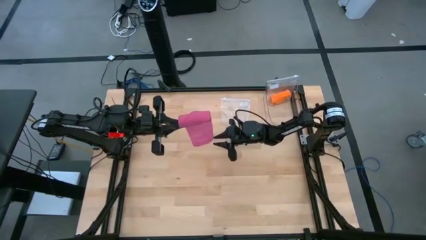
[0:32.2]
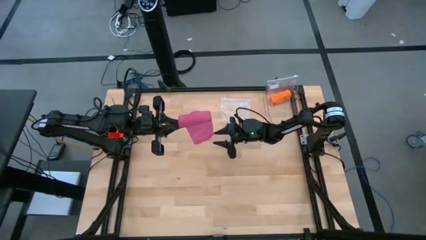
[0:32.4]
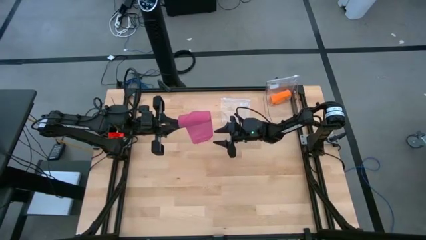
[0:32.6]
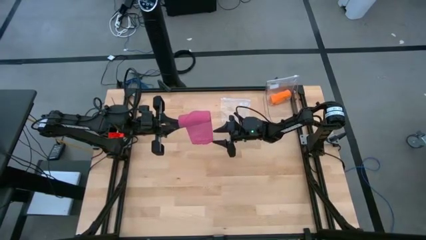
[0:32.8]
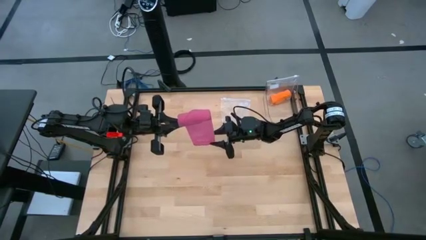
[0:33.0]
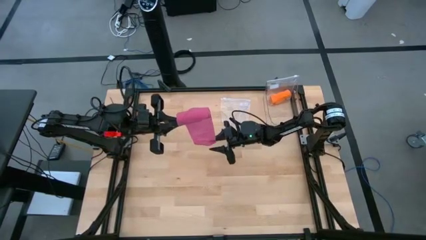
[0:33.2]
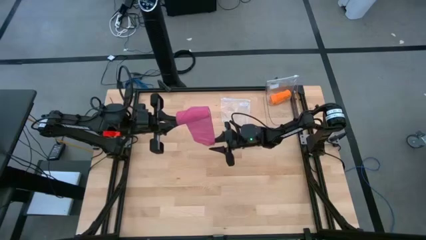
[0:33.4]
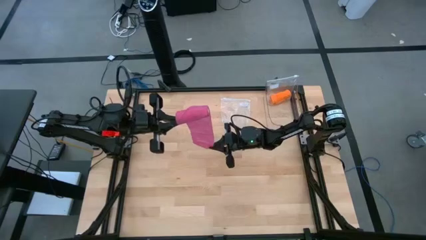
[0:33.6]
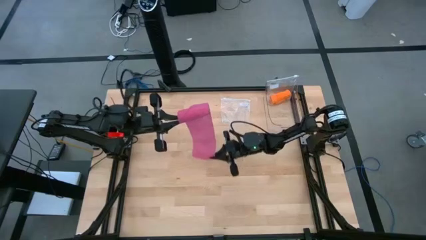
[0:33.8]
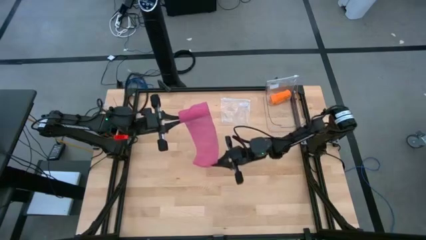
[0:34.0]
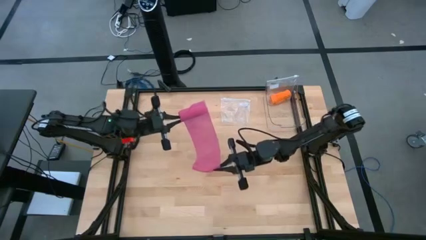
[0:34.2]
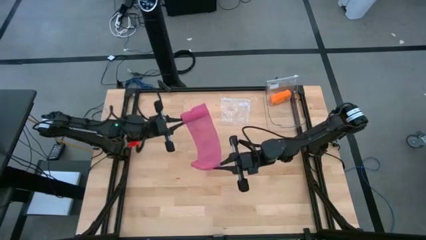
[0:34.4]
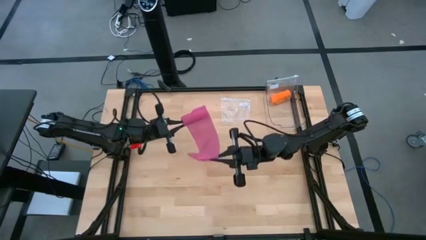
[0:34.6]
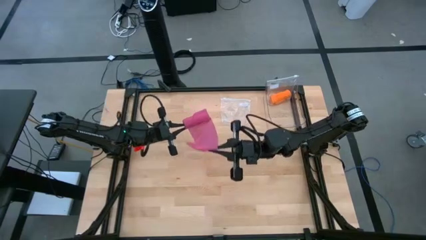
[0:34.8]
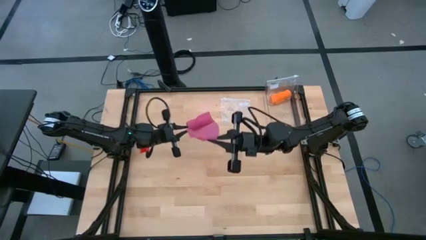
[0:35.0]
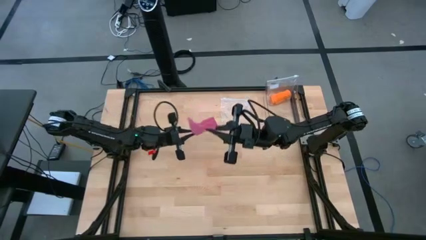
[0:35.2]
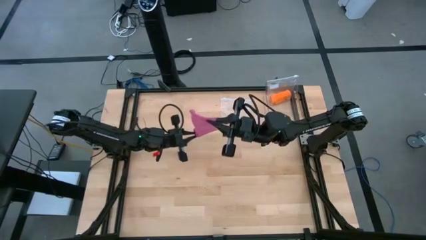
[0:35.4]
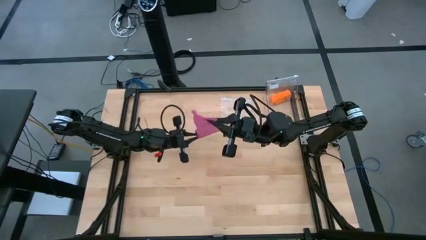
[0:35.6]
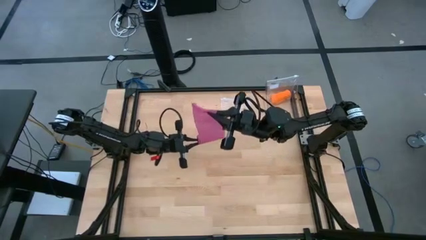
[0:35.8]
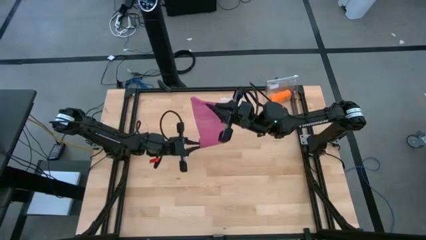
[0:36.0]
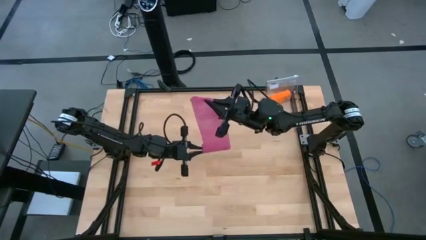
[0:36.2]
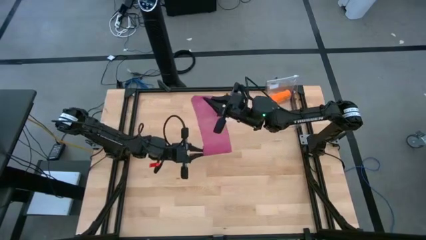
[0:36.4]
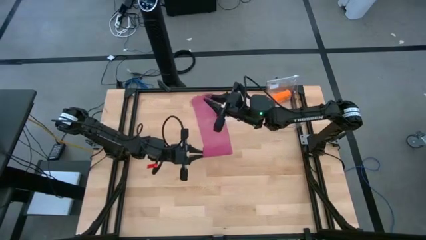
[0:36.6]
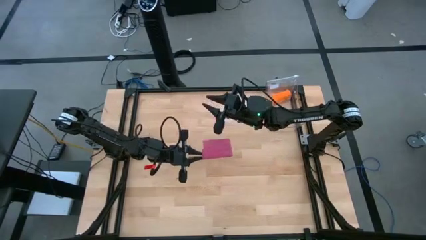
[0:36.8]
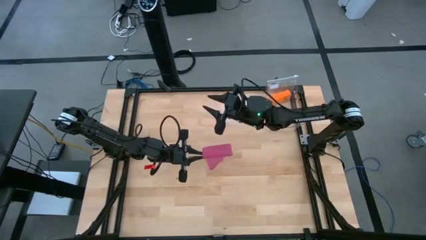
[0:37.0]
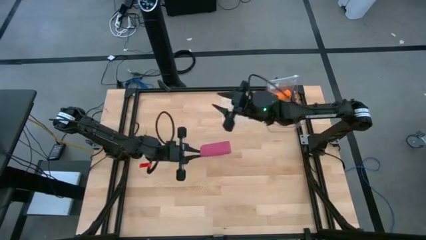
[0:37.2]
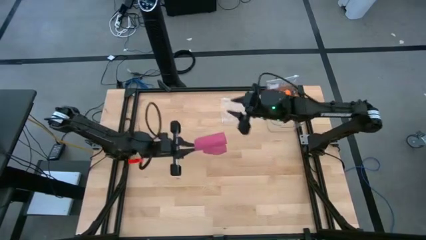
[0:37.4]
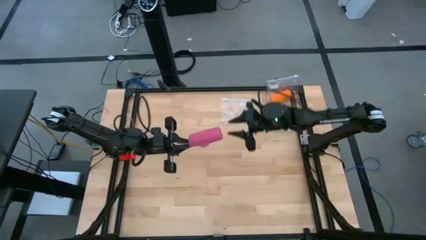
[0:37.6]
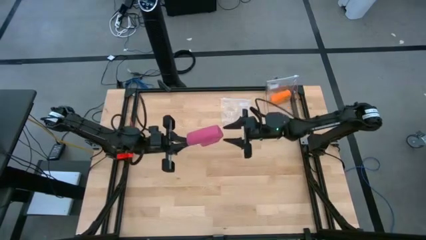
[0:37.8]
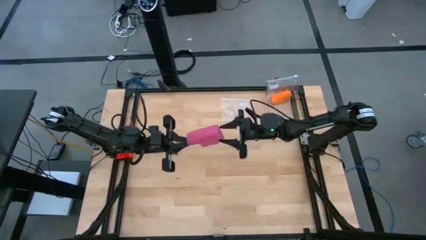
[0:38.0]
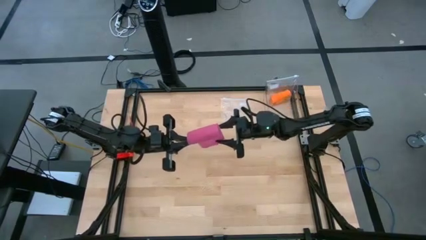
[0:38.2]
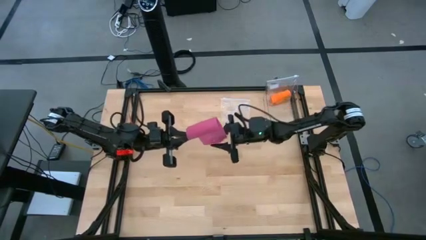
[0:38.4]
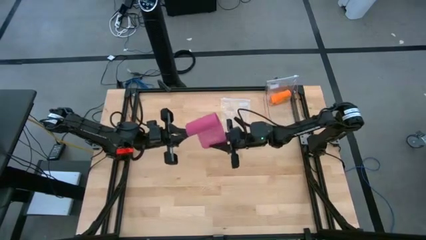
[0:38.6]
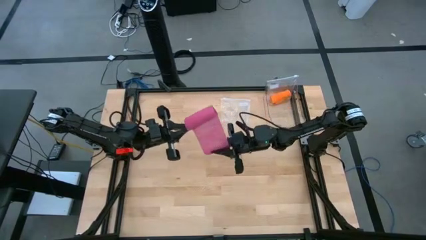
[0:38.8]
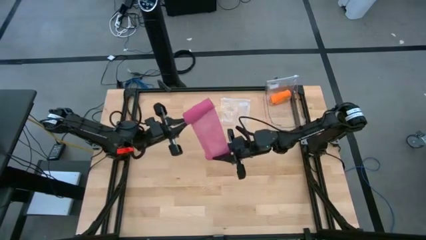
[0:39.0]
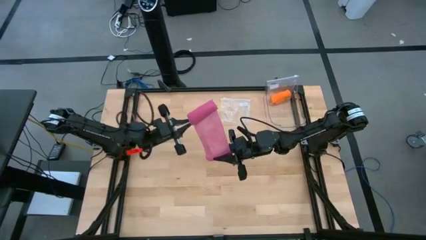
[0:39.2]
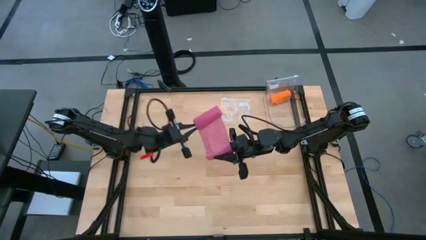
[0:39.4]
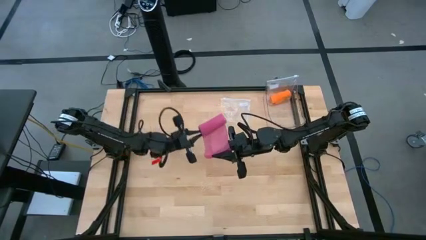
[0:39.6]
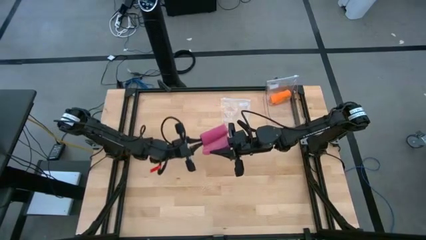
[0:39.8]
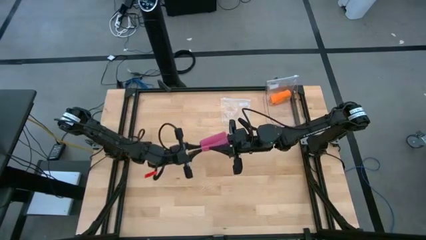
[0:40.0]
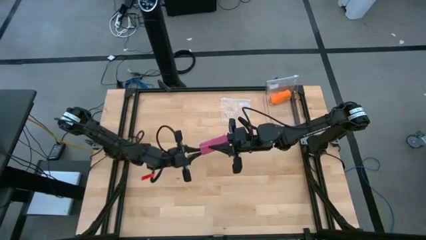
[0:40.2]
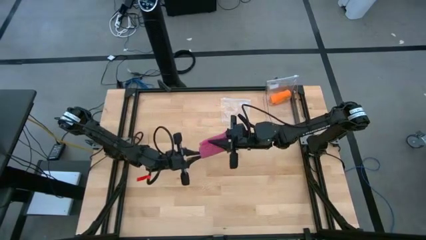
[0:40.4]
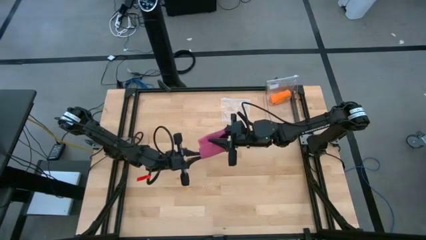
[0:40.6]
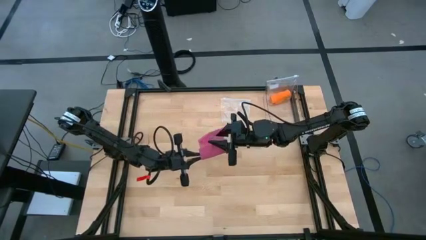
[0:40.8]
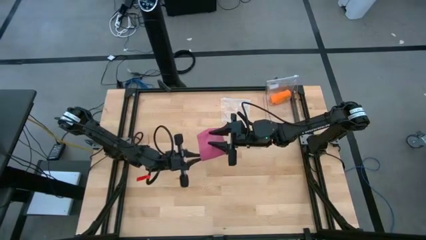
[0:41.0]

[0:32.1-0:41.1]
Task: Roll bandage
Roll the pink bandage

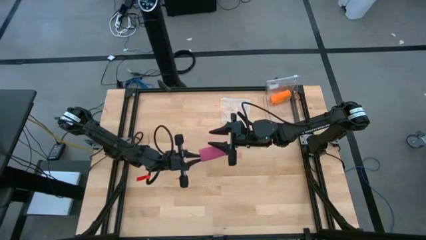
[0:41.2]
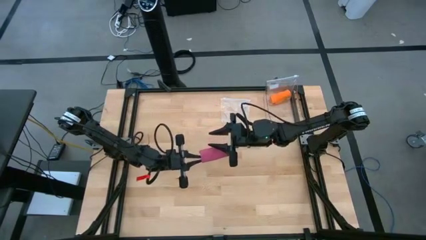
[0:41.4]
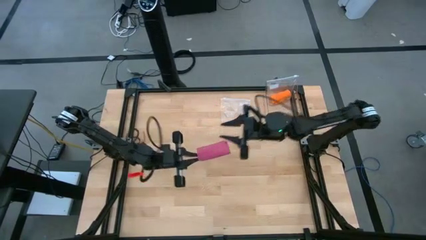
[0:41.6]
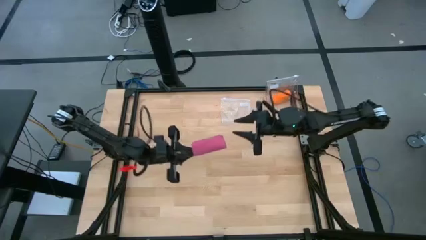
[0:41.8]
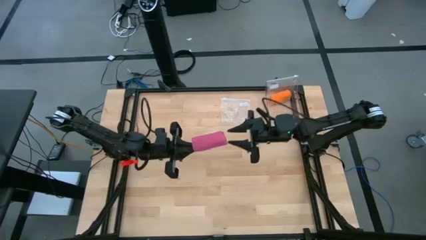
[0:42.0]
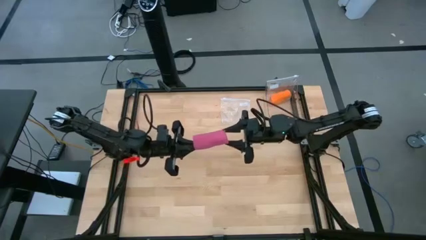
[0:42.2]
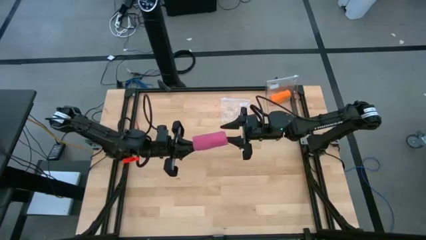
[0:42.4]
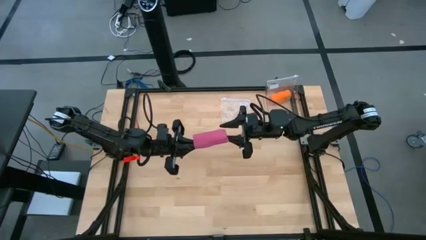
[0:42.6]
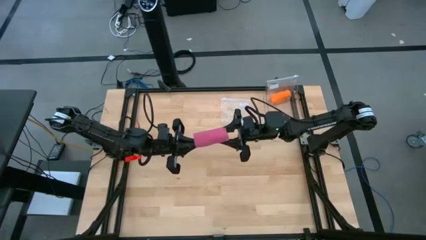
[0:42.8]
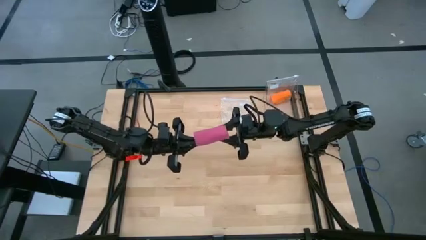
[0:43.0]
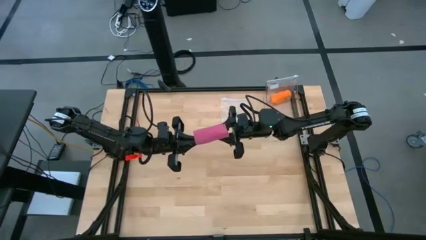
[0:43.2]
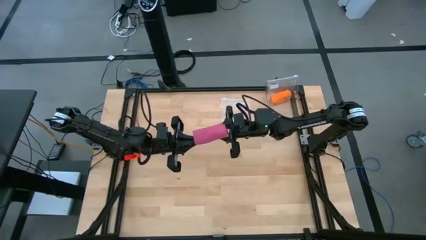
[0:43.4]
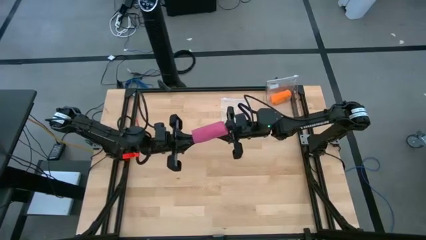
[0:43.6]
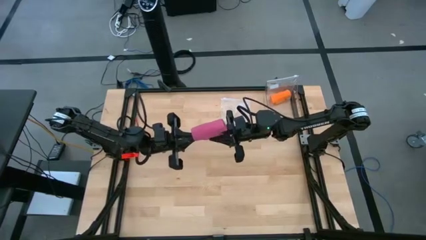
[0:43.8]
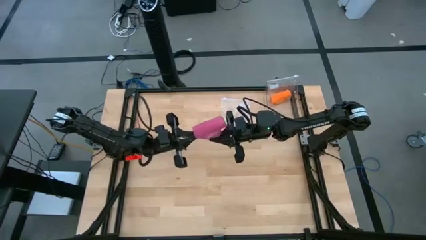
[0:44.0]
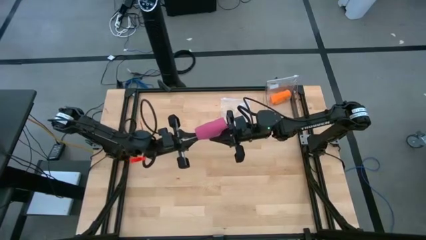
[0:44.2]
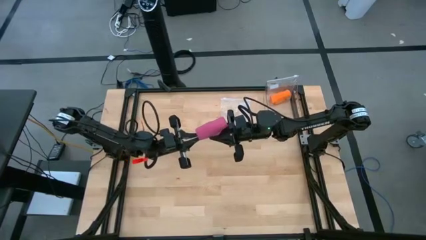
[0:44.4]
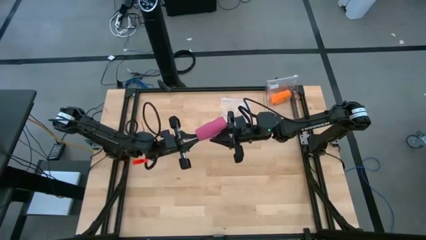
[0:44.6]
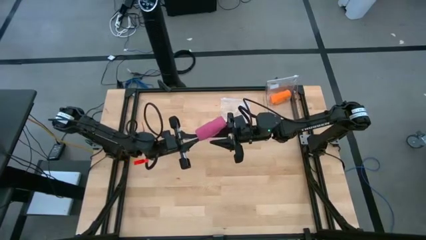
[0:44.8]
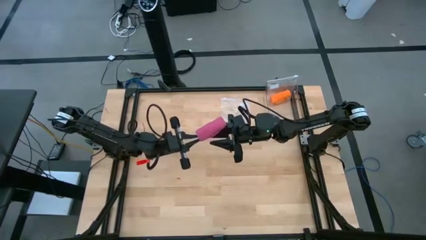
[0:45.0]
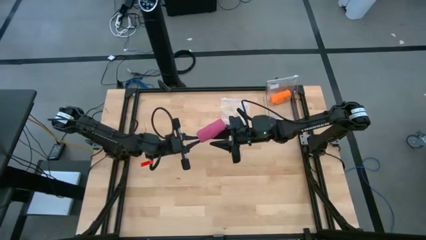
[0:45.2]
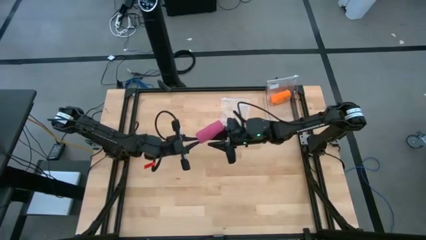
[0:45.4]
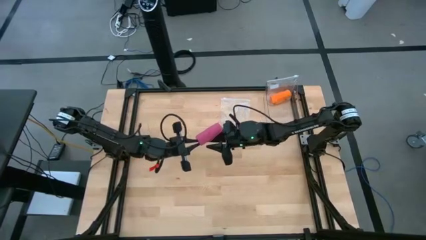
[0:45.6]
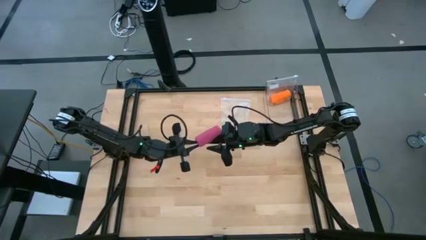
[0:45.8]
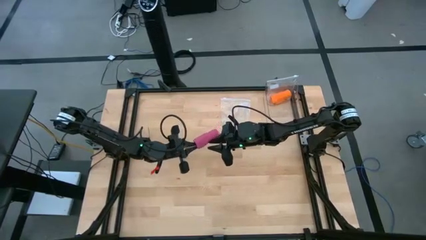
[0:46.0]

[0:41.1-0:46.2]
Roll the pink bandage

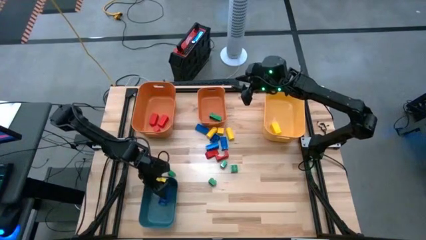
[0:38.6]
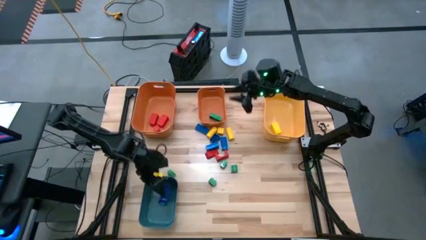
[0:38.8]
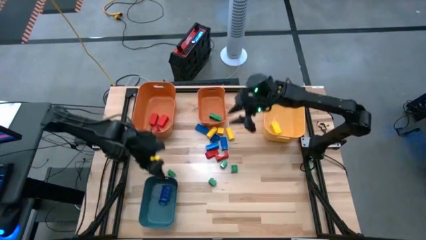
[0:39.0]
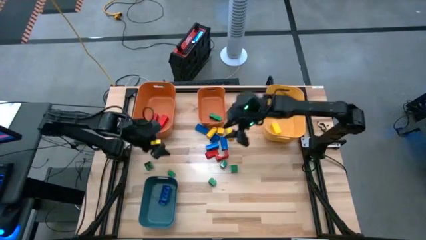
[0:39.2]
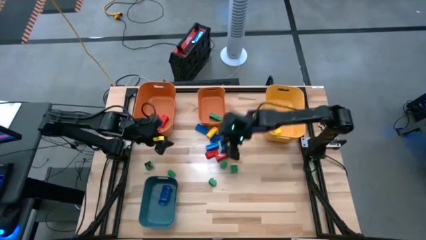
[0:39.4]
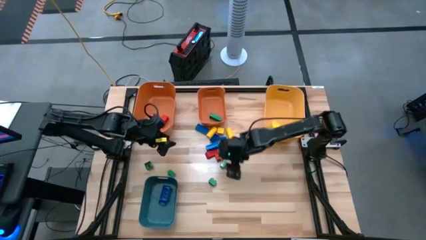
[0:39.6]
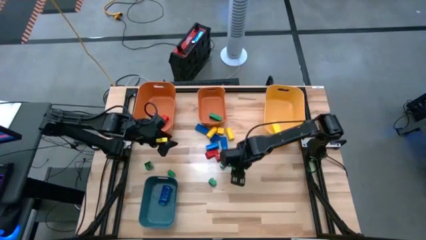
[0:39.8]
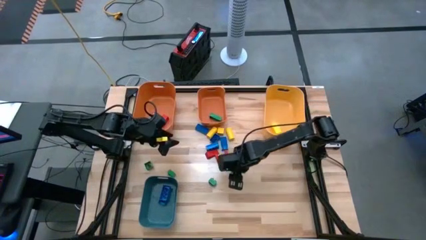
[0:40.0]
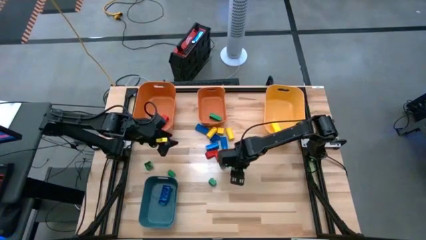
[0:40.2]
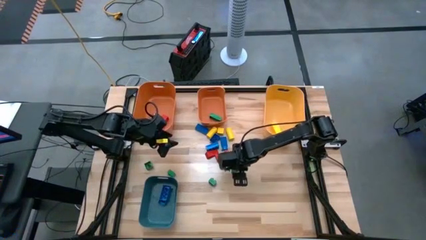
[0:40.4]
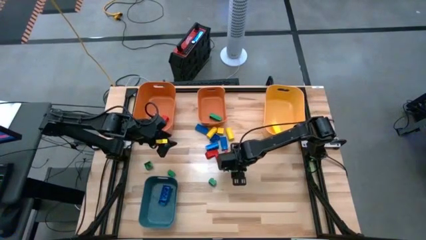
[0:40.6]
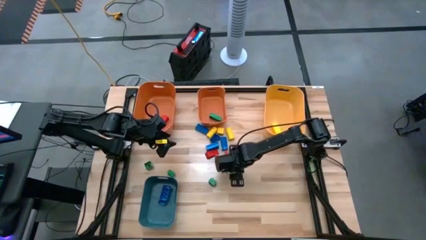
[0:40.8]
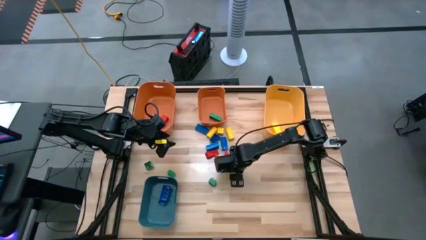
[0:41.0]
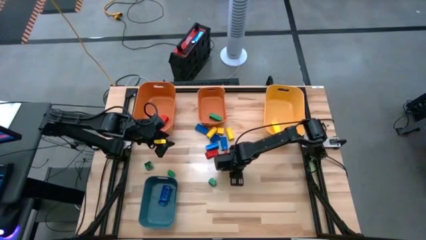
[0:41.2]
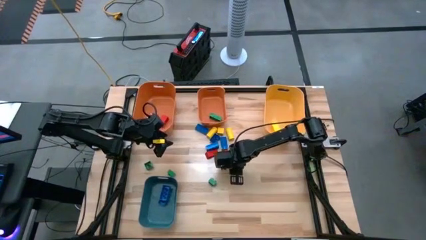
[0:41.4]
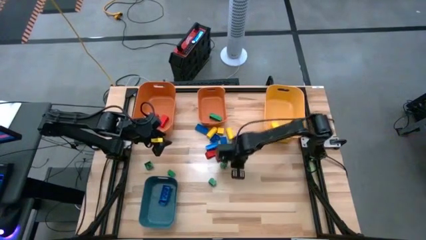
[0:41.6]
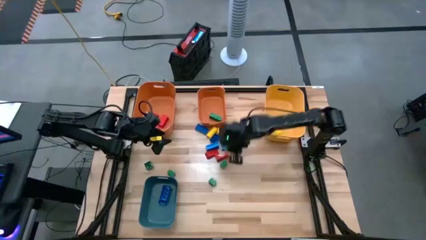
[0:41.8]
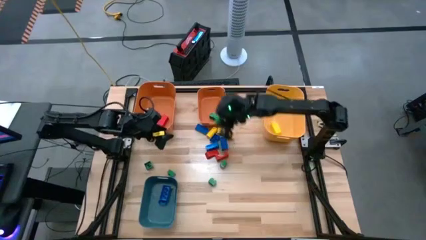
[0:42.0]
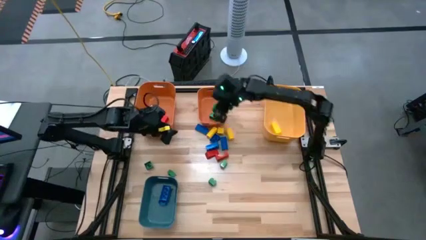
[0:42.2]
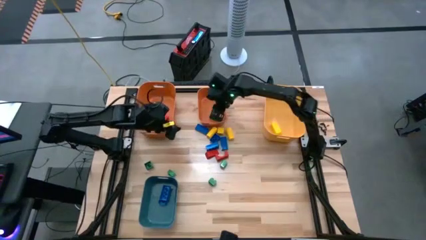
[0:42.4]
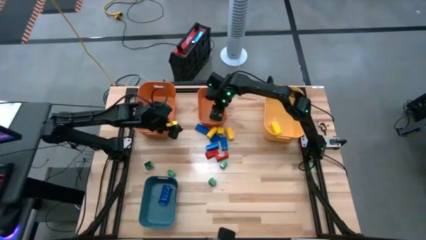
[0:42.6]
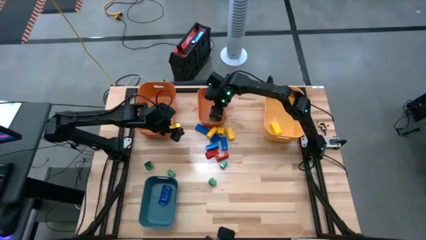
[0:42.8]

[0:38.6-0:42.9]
Task: Sort blocks
Put the green game piece into the right orange bin
